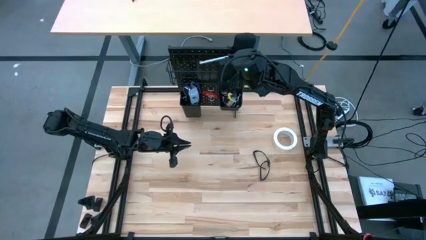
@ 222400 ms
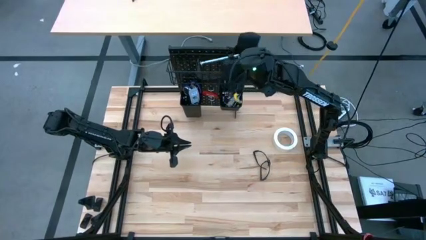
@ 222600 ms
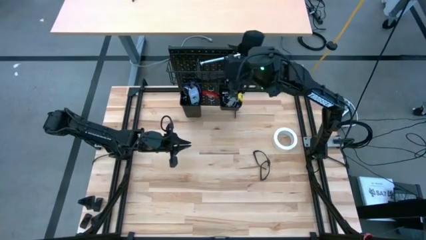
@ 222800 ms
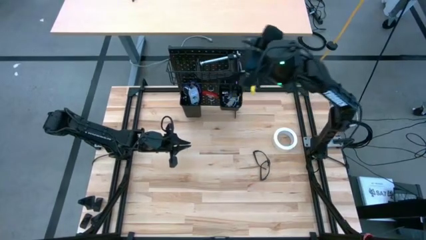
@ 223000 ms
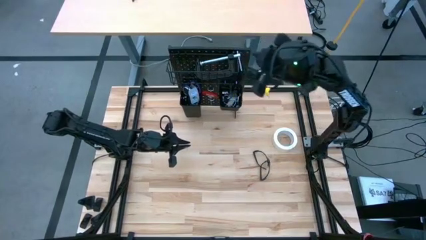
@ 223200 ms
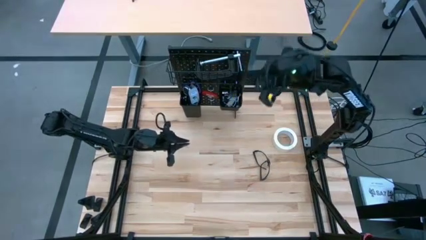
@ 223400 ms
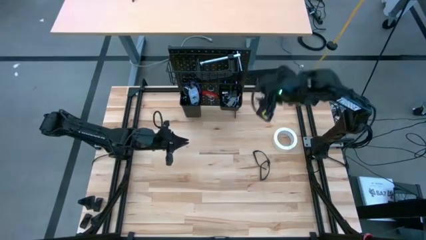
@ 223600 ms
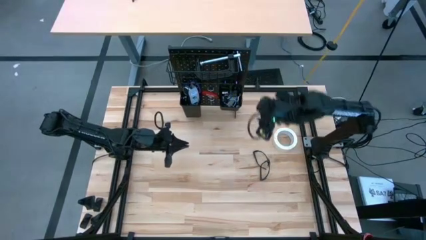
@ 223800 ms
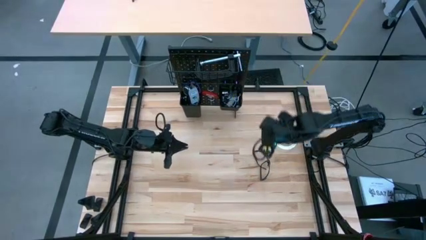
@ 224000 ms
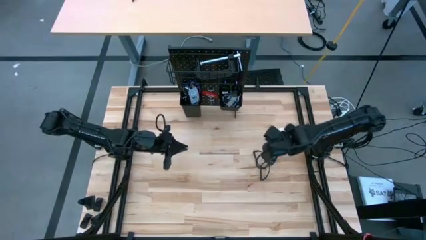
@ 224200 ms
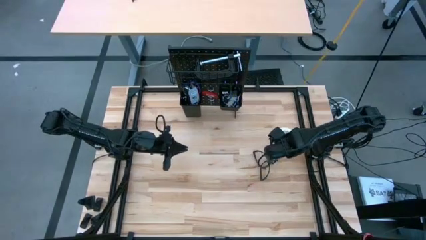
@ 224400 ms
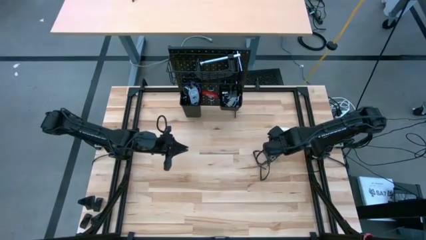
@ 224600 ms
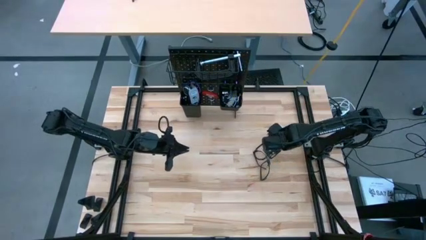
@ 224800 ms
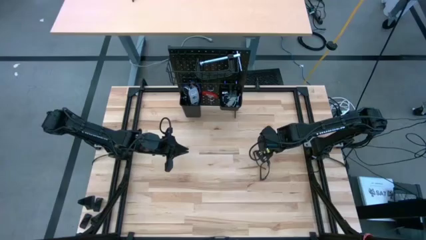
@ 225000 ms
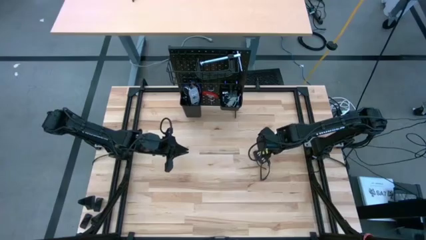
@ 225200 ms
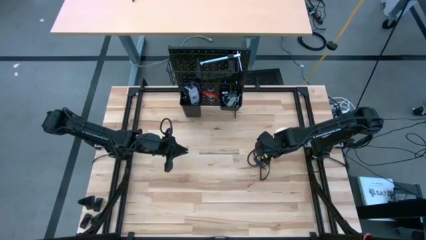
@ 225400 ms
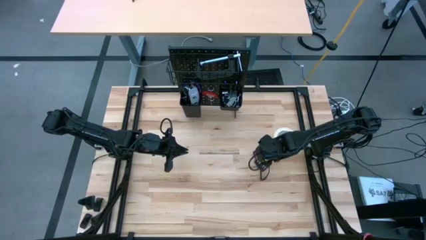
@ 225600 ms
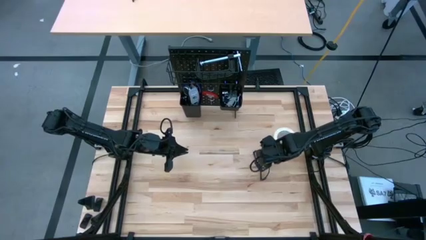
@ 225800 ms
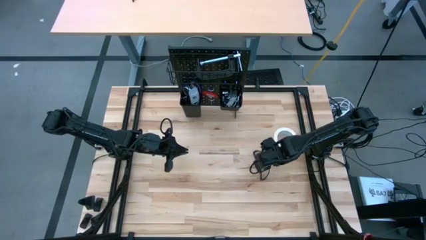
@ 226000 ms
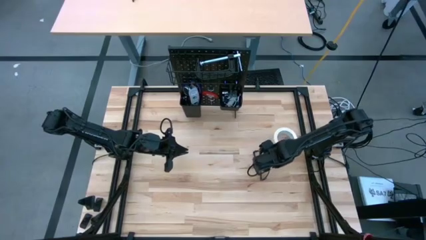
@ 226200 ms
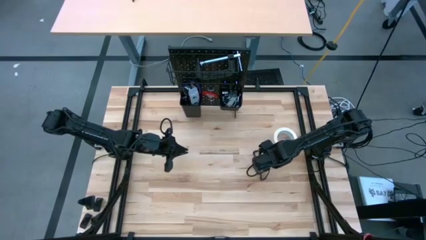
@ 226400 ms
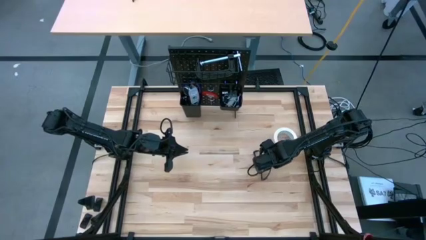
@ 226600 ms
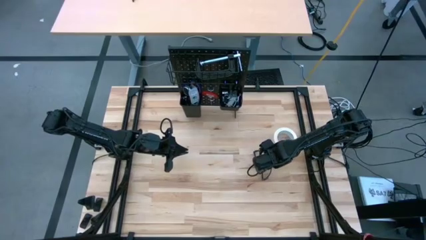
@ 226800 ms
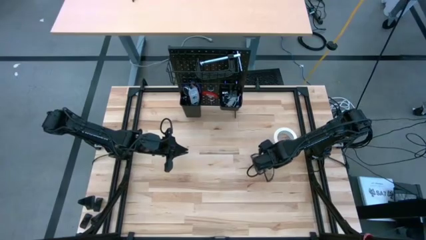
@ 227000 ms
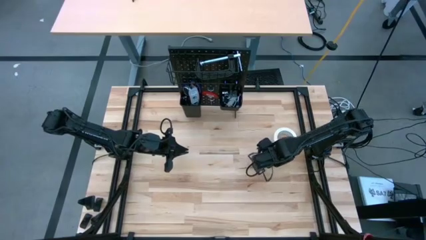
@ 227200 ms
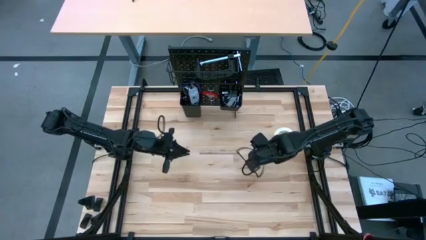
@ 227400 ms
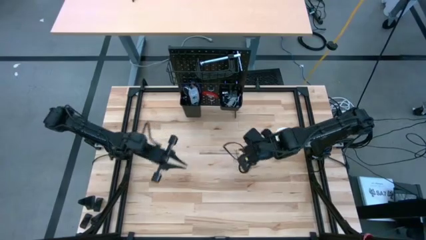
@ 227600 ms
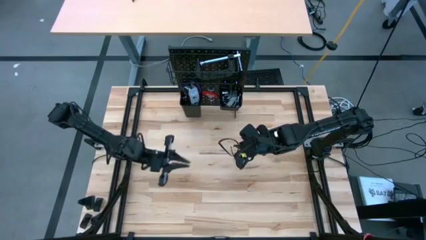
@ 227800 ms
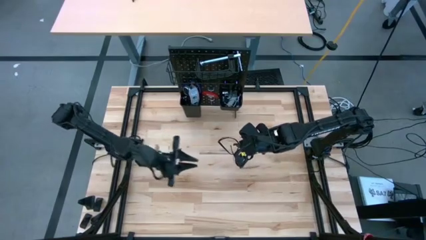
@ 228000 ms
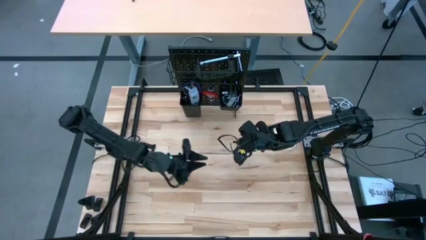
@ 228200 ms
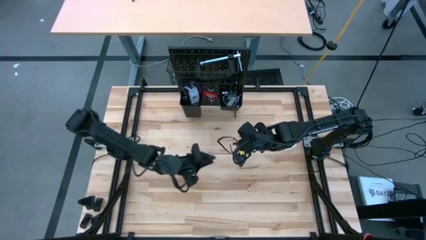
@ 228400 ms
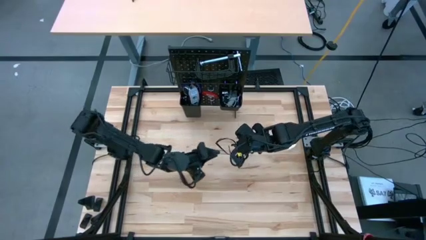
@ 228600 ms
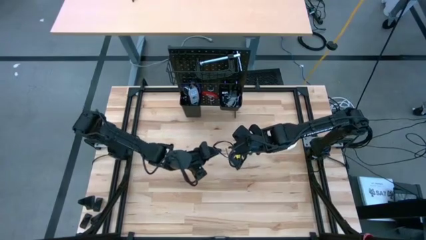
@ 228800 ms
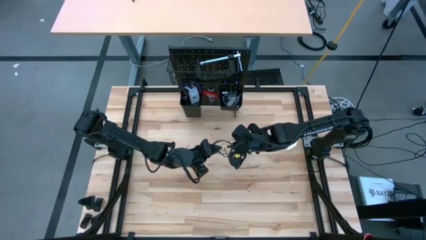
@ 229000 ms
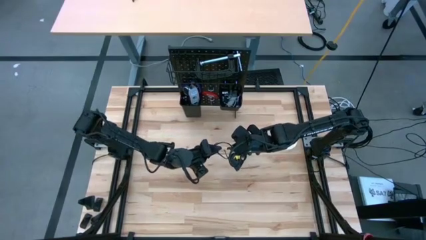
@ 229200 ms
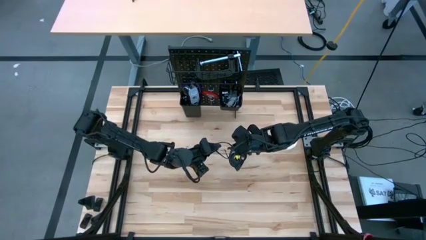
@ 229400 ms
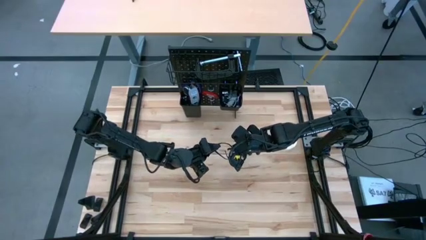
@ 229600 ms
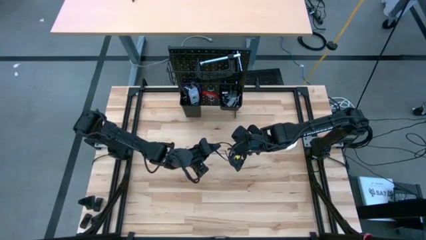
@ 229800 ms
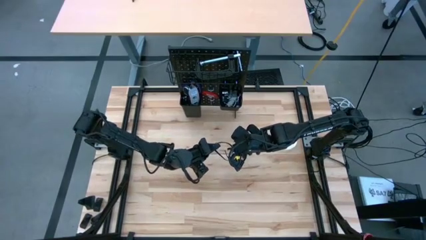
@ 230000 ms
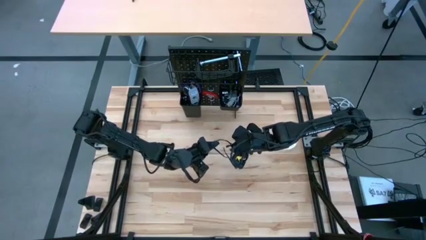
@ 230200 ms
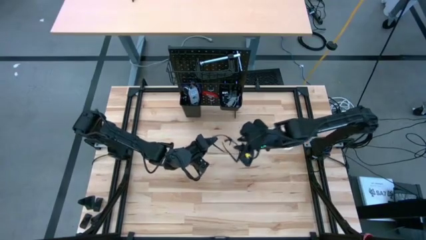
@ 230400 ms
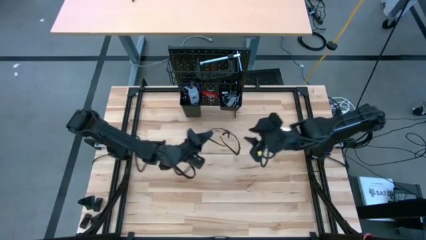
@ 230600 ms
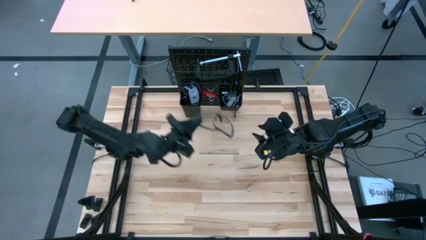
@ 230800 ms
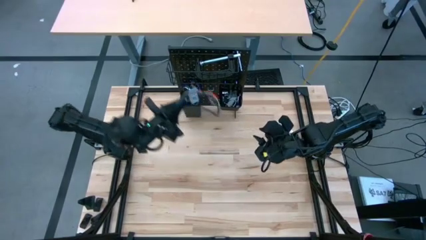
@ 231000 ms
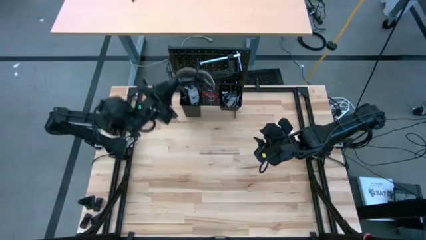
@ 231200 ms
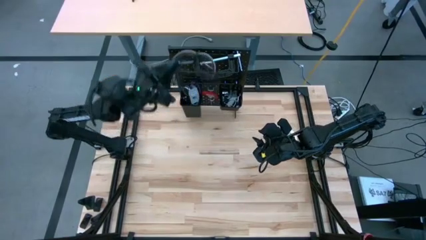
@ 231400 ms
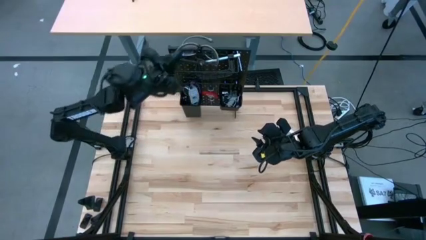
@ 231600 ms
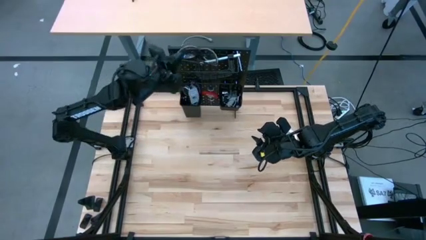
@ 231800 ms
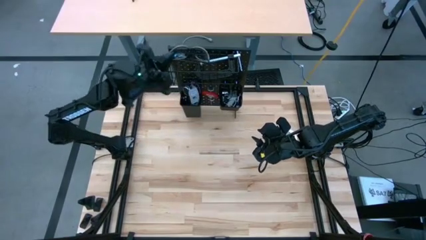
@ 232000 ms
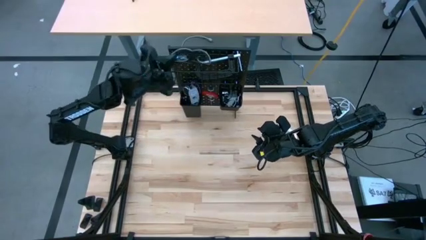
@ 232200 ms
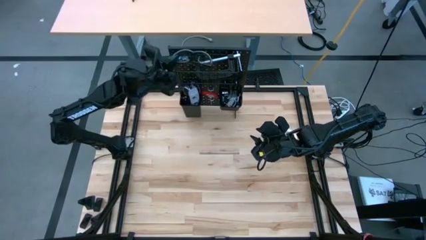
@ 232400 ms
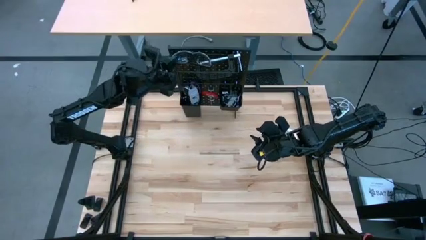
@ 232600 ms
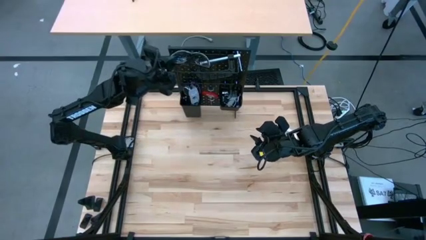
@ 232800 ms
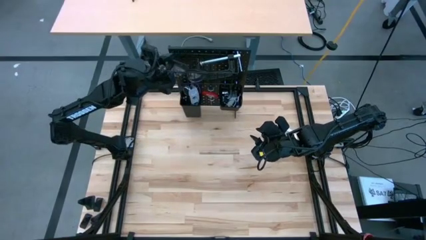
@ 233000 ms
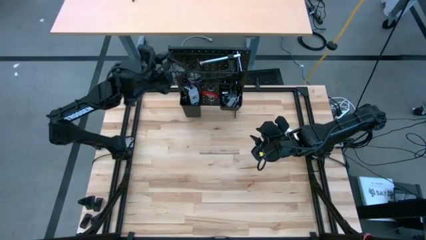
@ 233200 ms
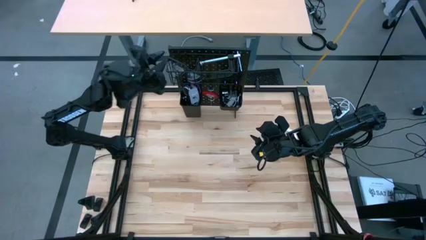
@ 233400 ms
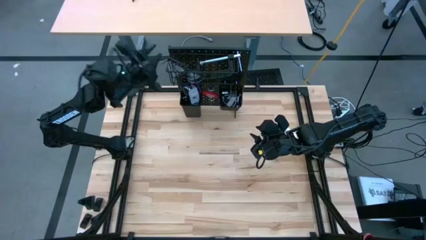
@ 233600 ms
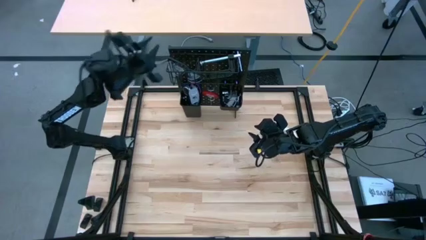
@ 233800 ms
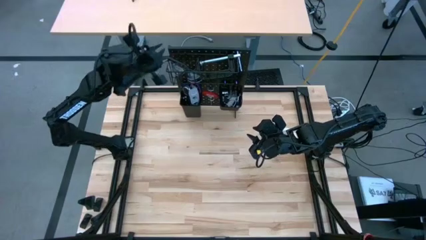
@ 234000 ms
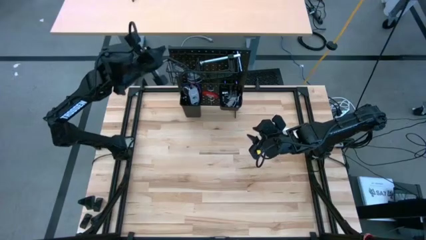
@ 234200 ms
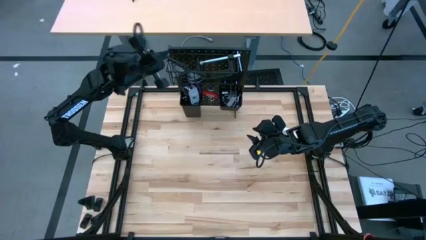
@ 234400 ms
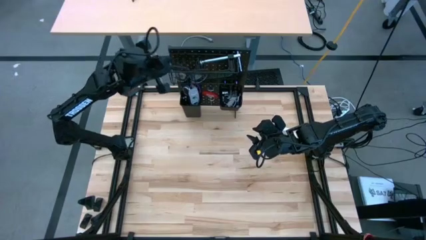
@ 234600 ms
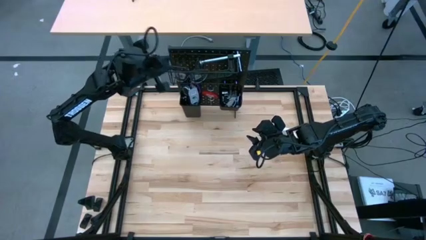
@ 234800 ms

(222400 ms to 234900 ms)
Task: Hang tools onto peg board
Put the safety glasses into the wire basket on the peg board
